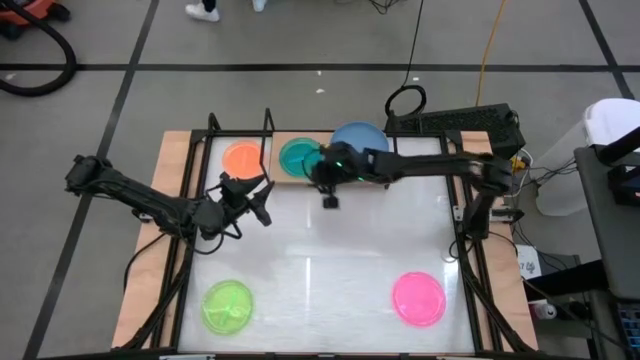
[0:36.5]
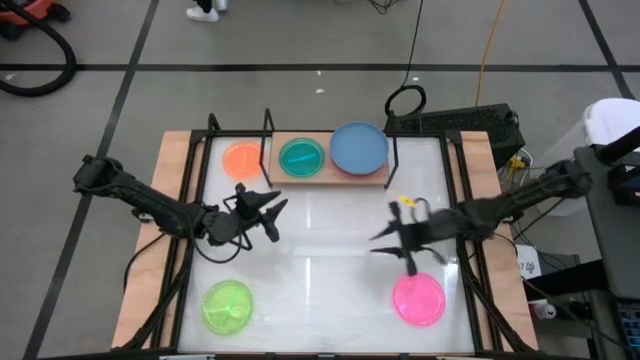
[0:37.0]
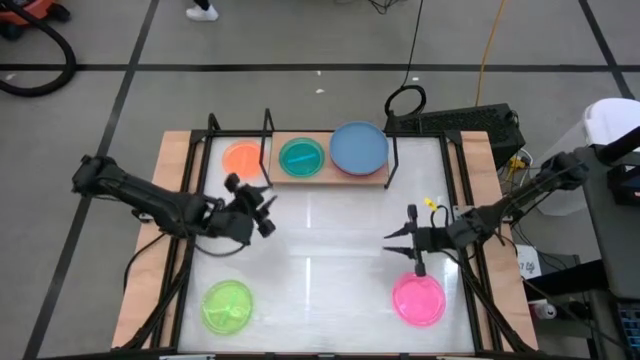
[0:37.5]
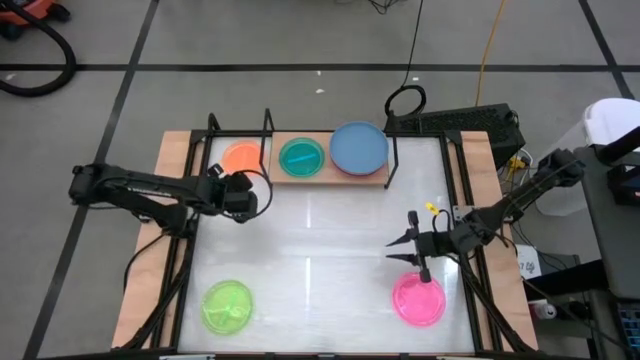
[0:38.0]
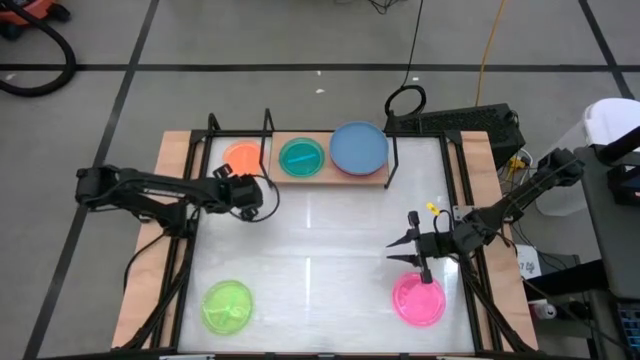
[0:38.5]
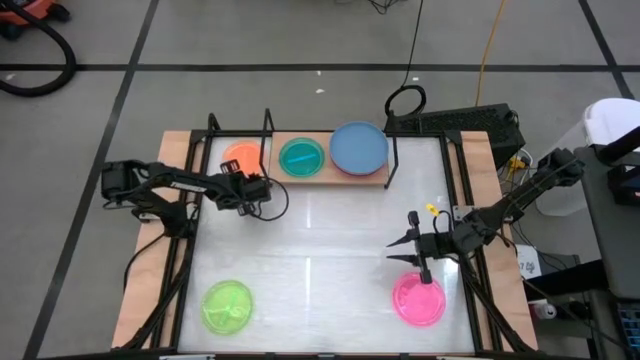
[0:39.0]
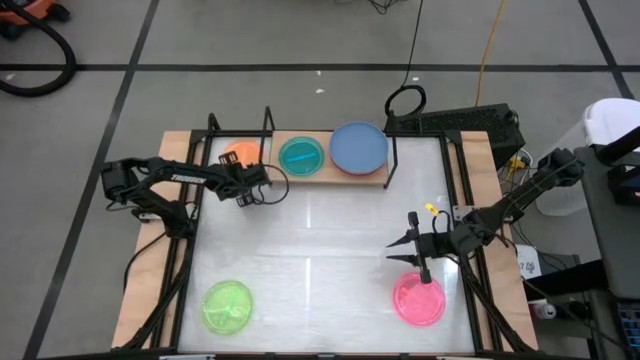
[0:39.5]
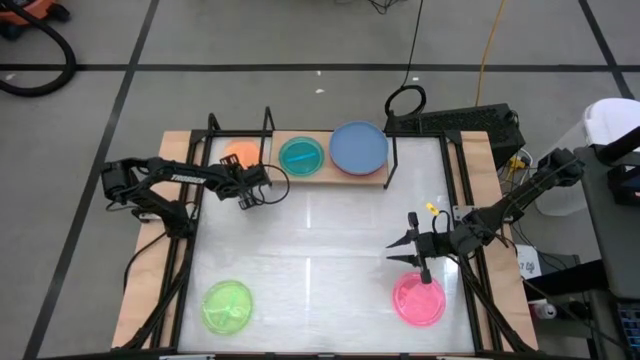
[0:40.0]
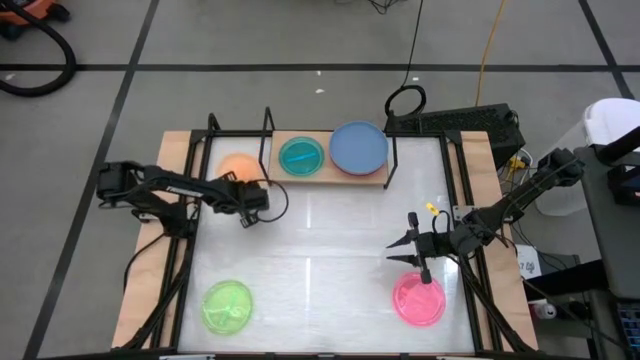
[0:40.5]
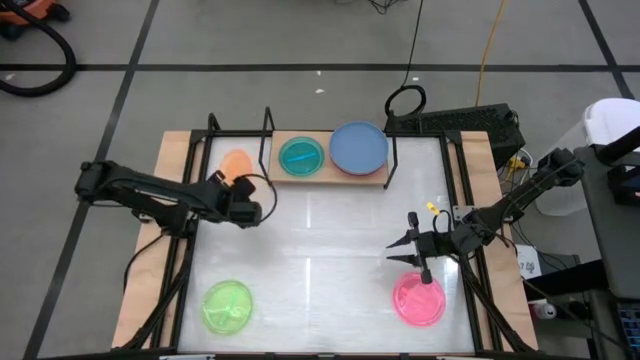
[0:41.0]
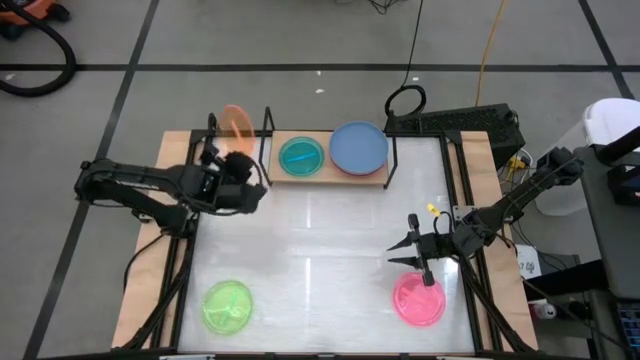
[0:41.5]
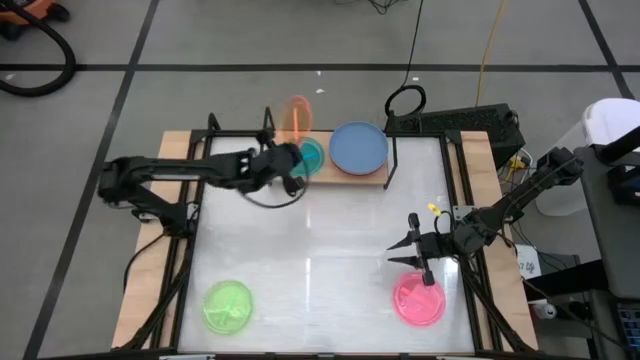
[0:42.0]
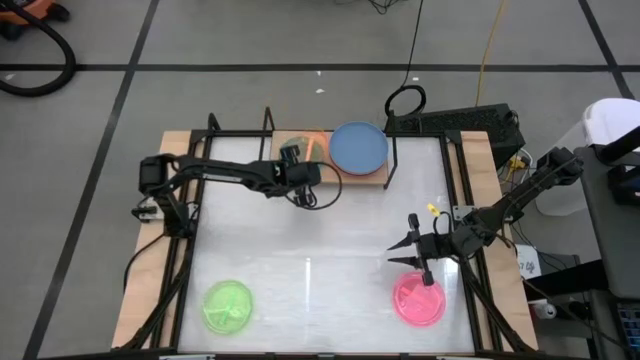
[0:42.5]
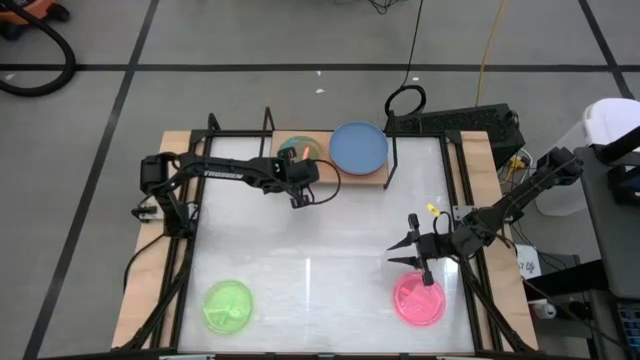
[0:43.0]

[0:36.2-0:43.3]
Task: Place and stack plates onto a shelf
Stack the light orange plate on the light blue plate

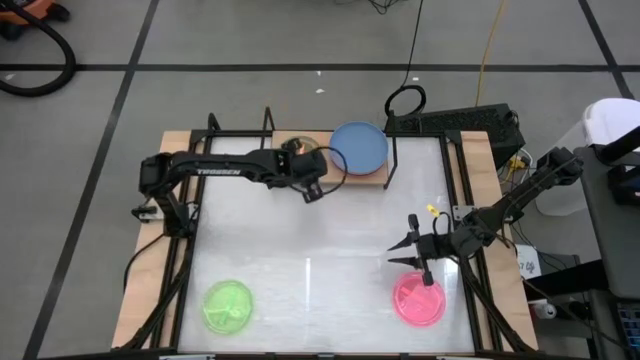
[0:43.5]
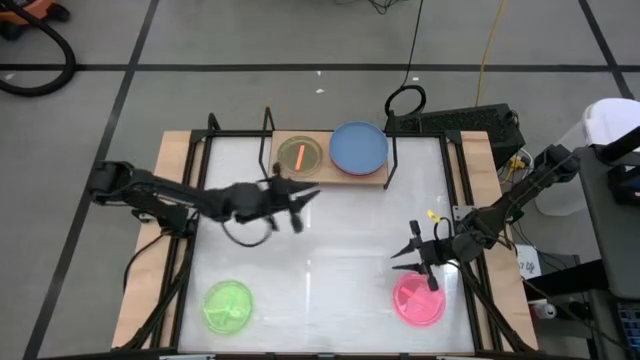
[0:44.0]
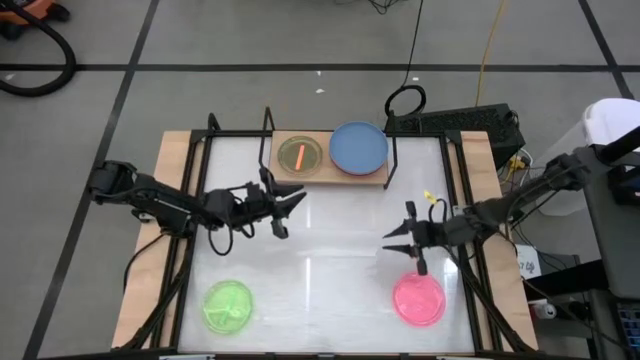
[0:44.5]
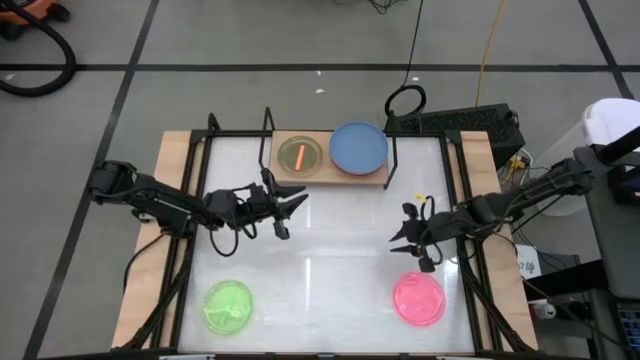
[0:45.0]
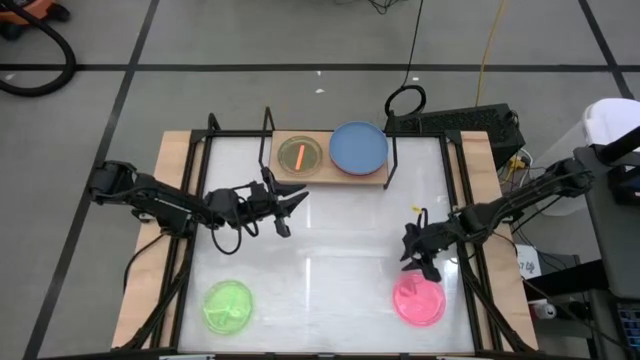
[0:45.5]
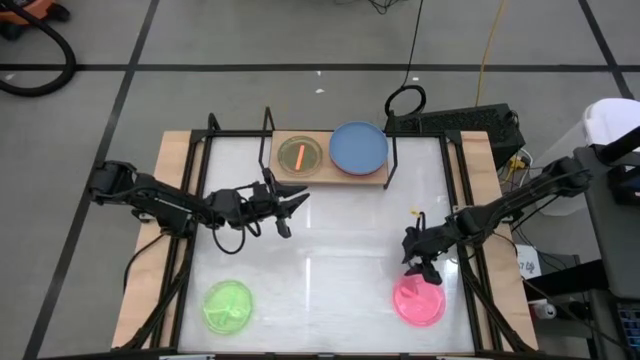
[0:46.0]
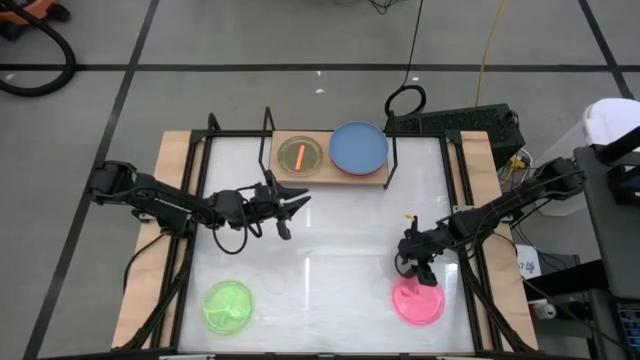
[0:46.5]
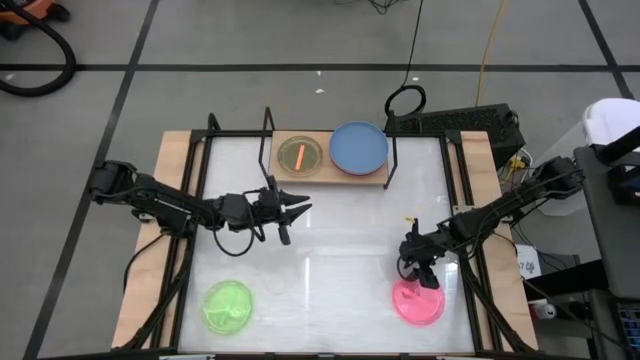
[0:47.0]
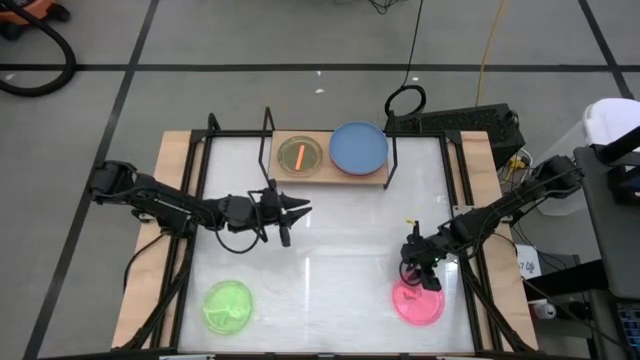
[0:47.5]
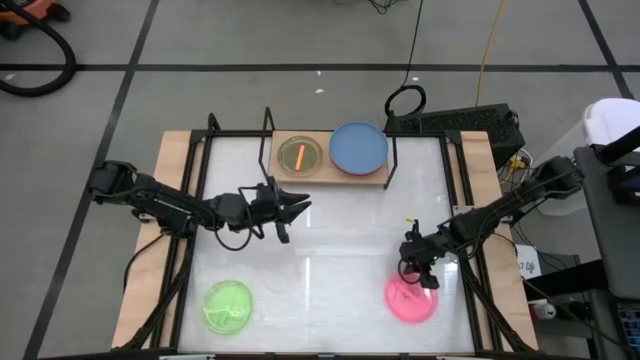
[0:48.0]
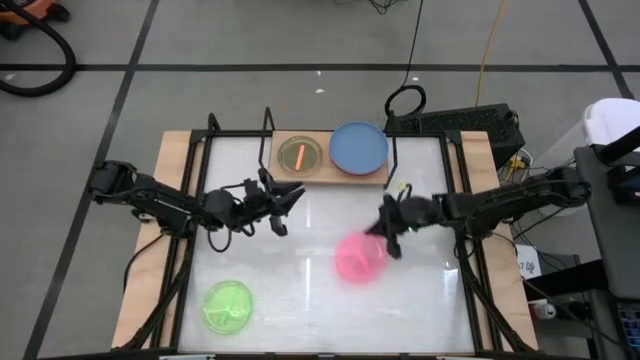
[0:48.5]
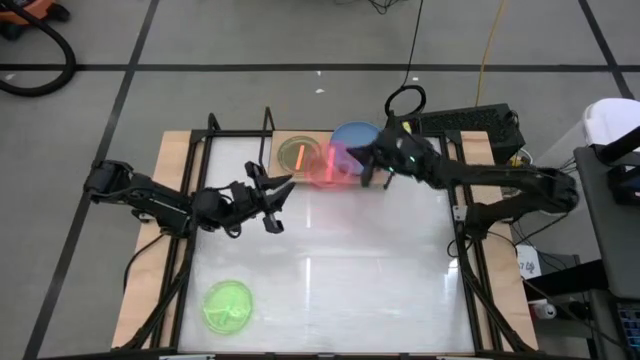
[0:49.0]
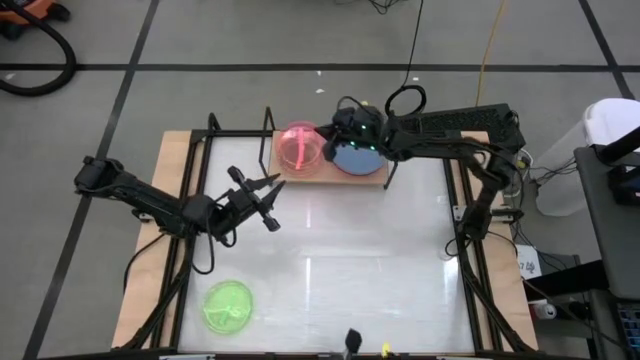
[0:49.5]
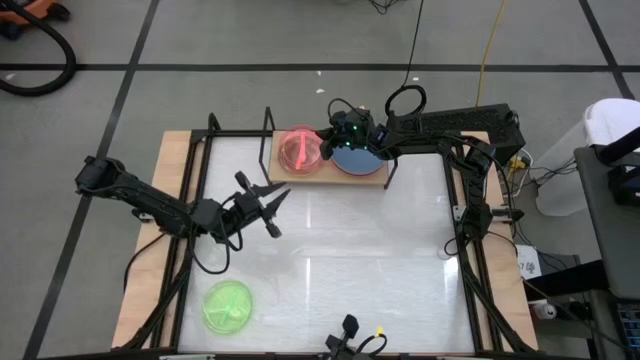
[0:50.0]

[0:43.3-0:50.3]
Stack the light pink plate on the light orange plate

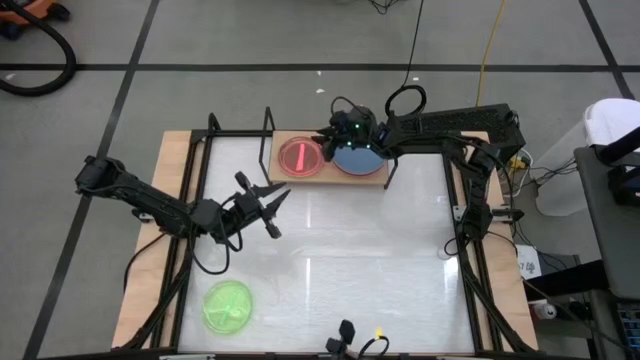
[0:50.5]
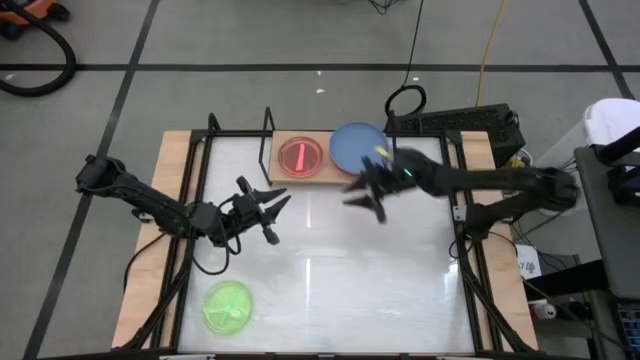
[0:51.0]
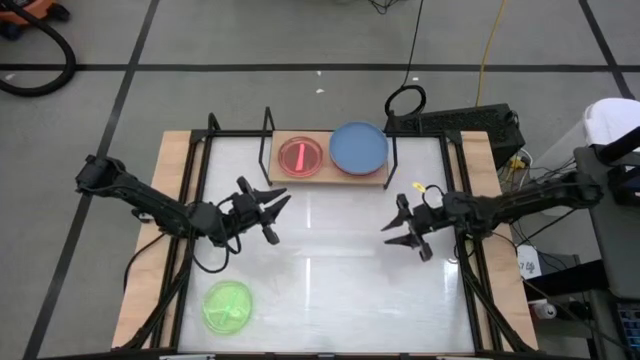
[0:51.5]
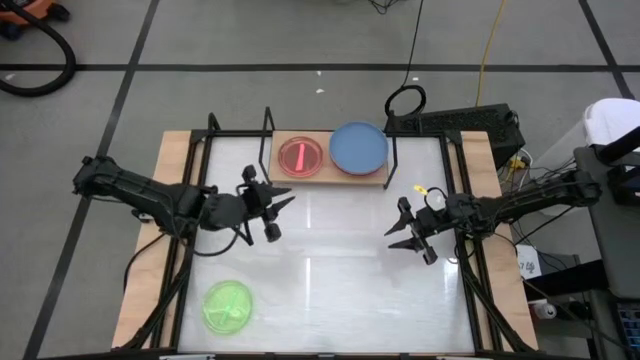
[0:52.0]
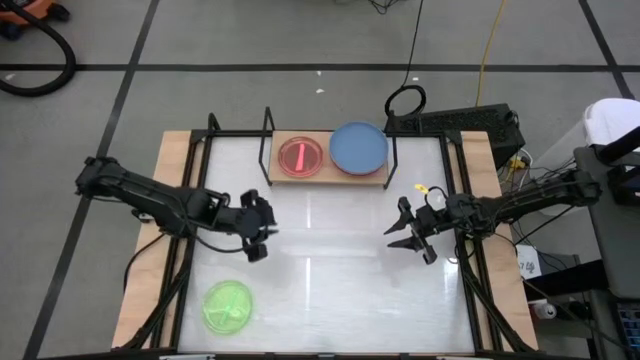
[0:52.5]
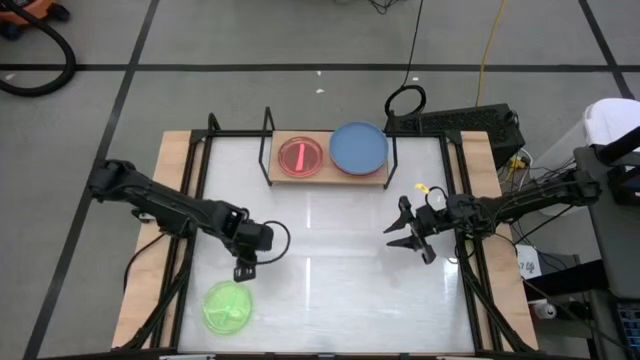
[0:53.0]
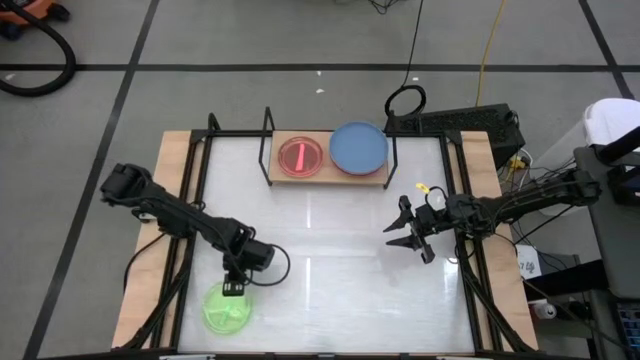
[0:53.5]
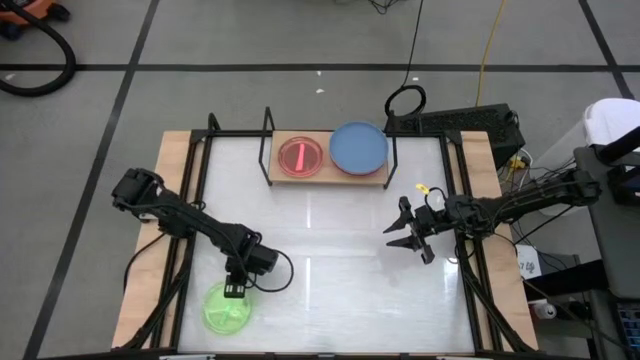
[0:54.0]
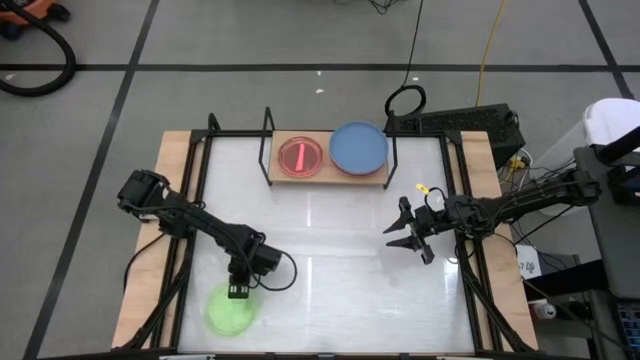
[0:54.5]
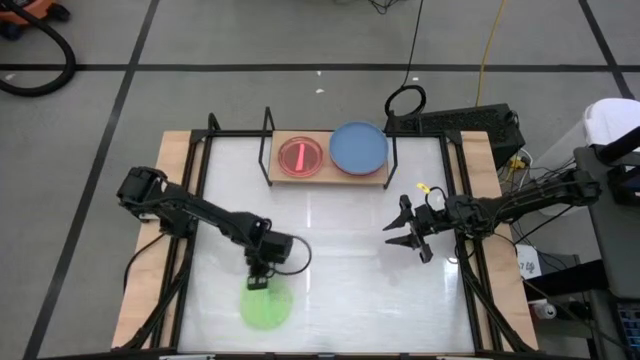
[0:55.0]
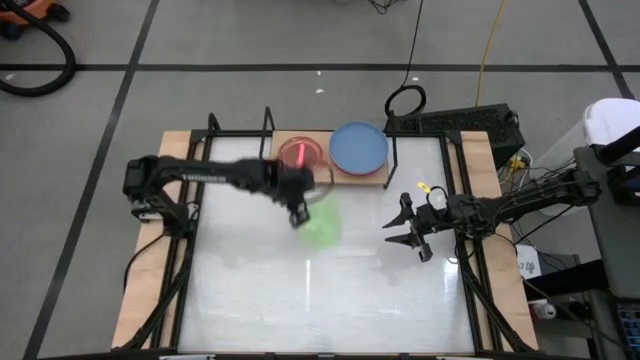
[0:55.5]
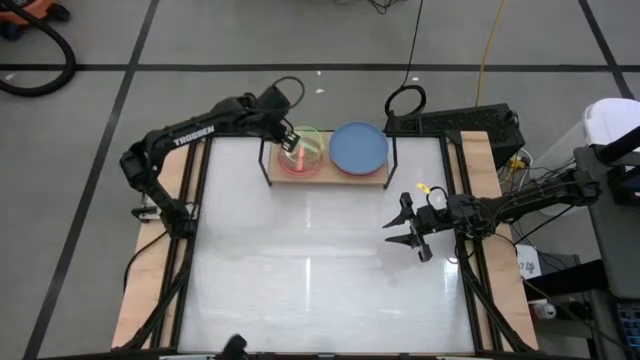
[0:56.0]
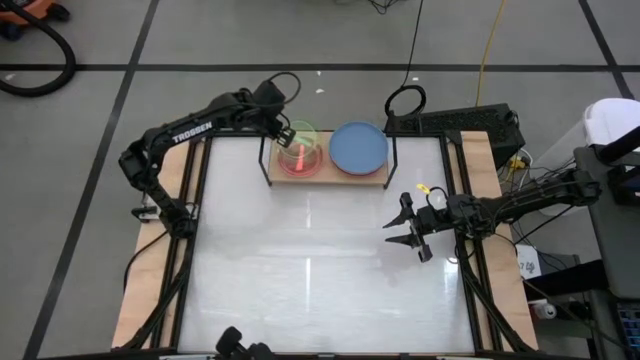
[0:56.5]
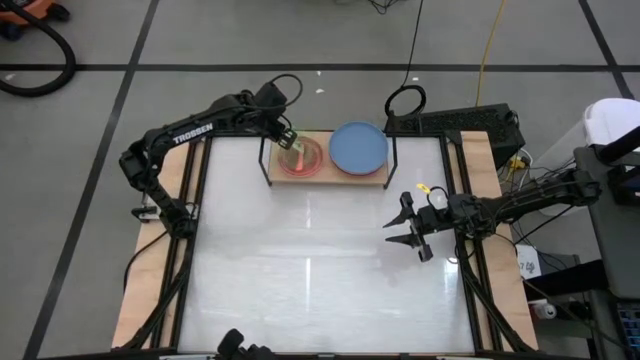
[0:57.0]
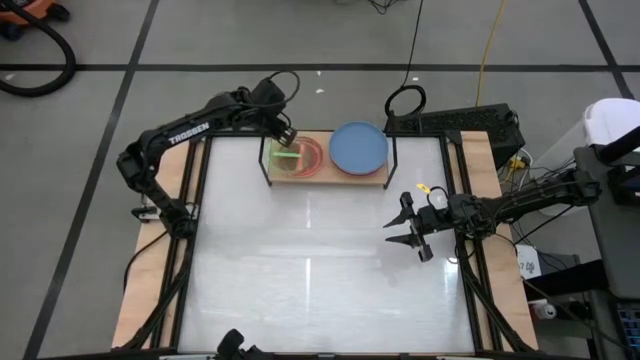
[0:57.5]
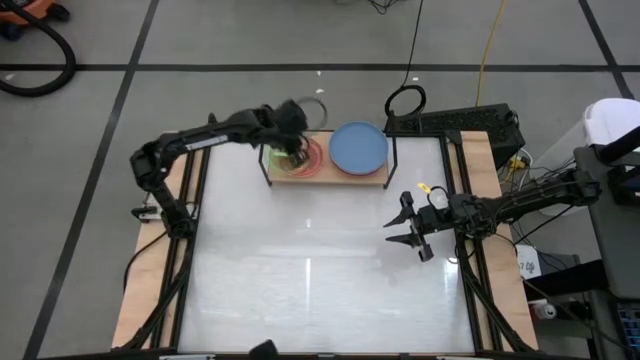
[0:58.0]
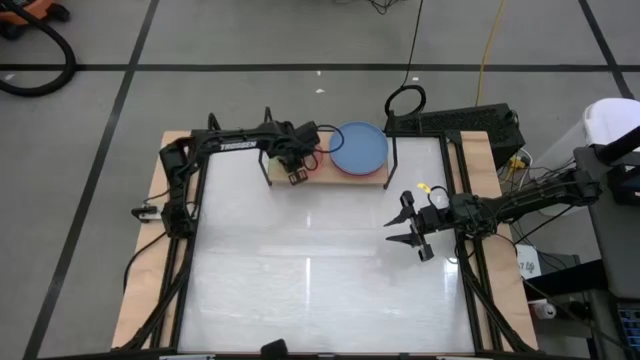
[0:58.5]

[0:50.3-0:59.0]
Stack the light green plate on the light orange plate
